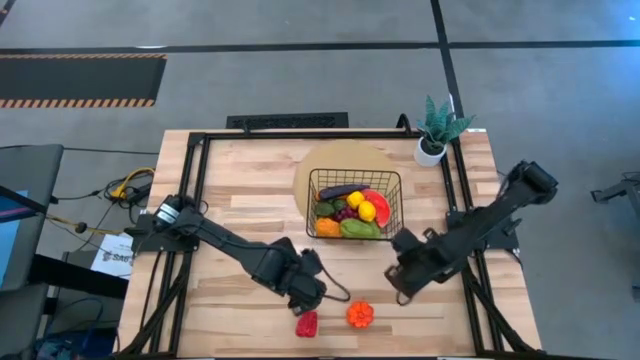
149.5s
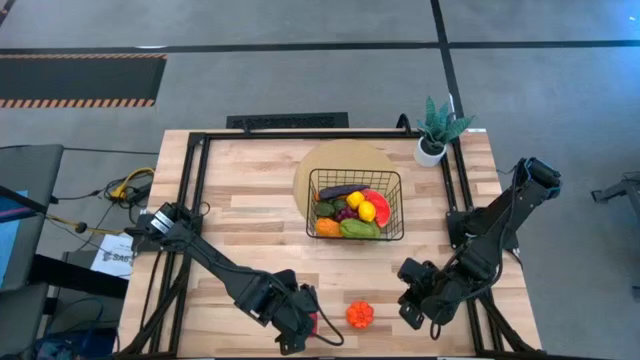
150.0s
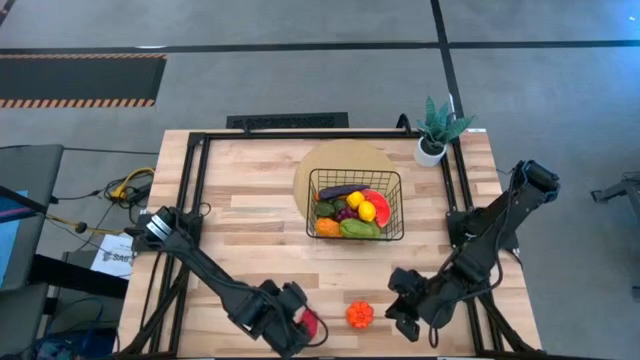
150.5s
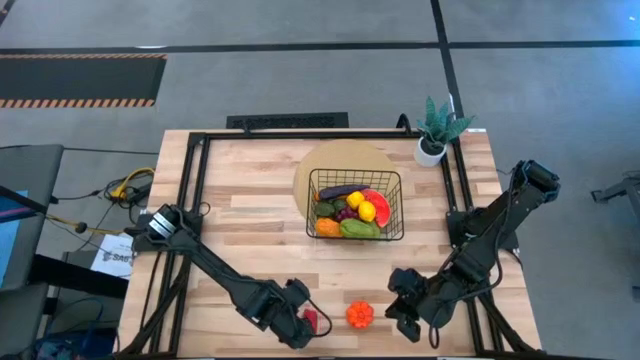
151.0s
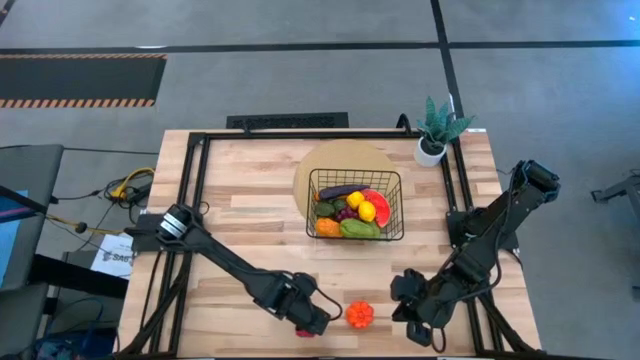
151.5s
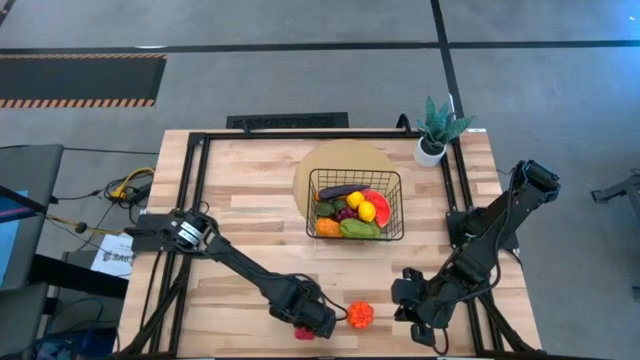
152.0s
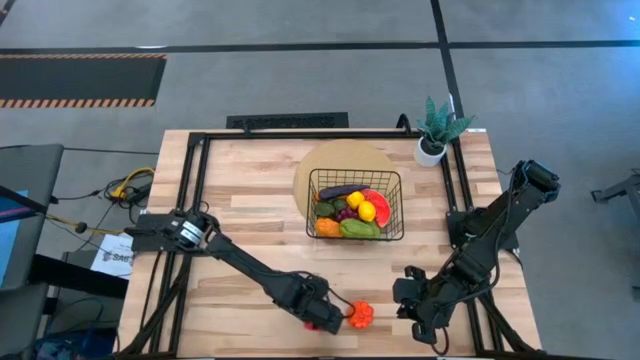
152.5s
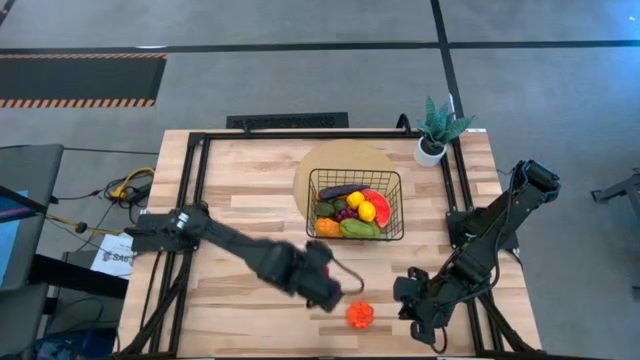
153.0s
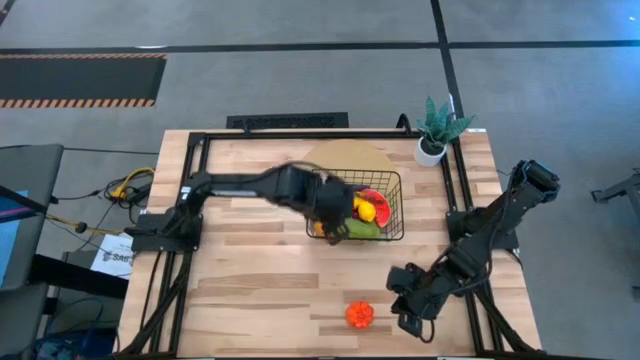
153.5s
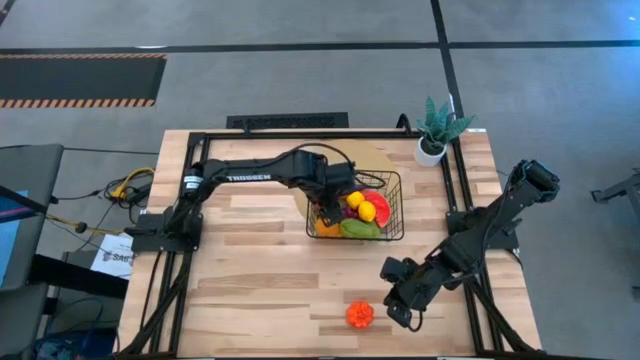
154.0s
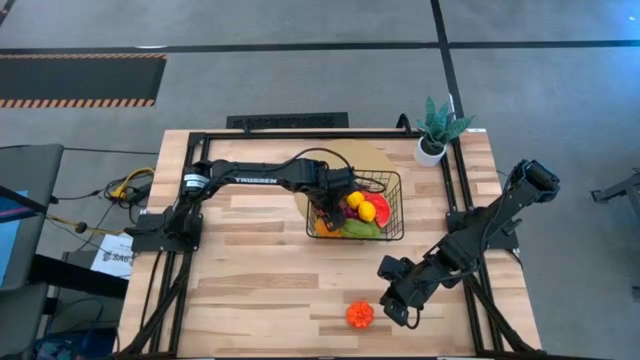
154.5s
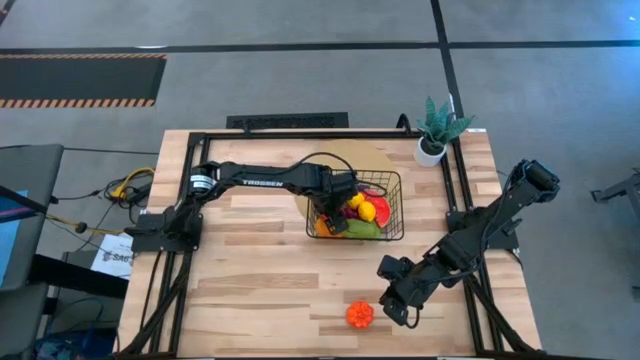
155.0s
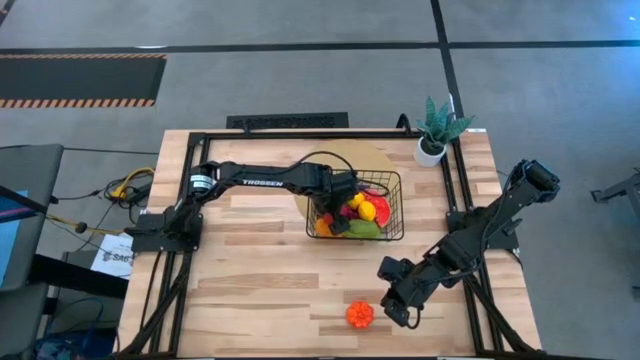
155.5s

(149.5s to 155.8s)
Task: Build produce basket
Put the red bell pepper into the wire basket

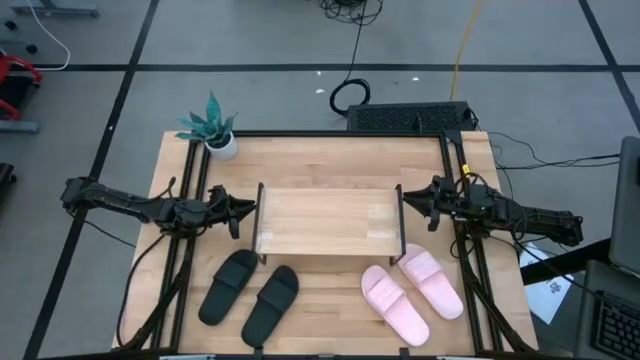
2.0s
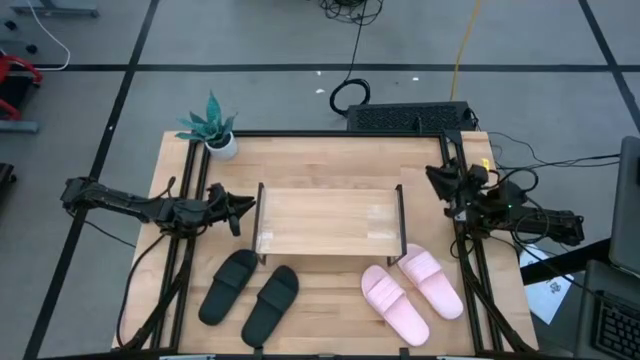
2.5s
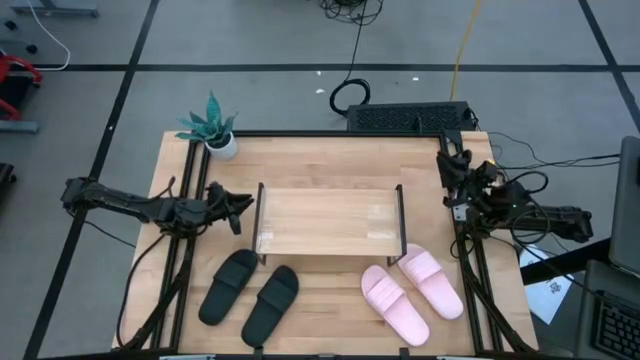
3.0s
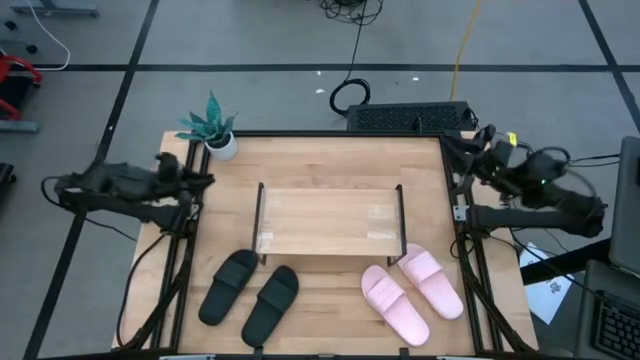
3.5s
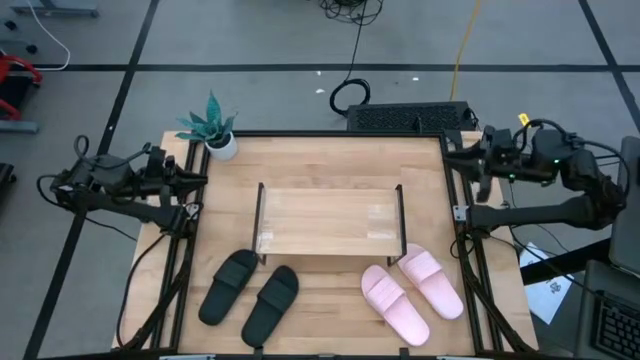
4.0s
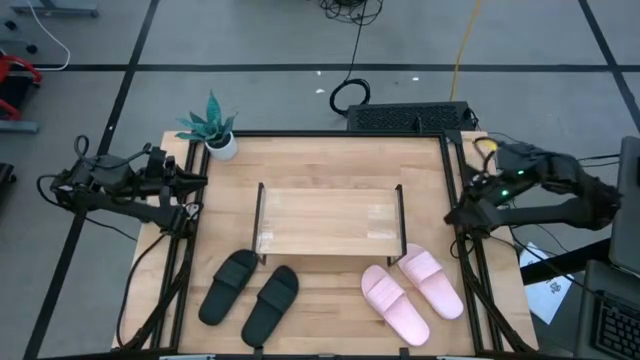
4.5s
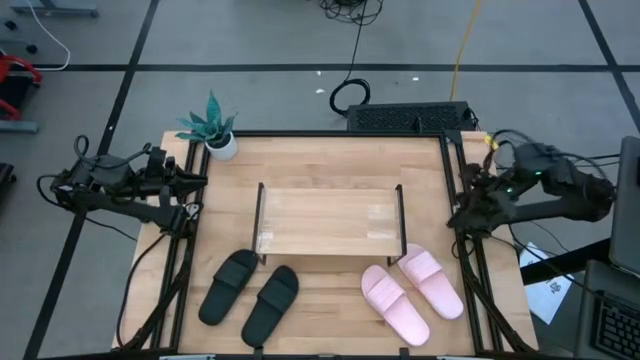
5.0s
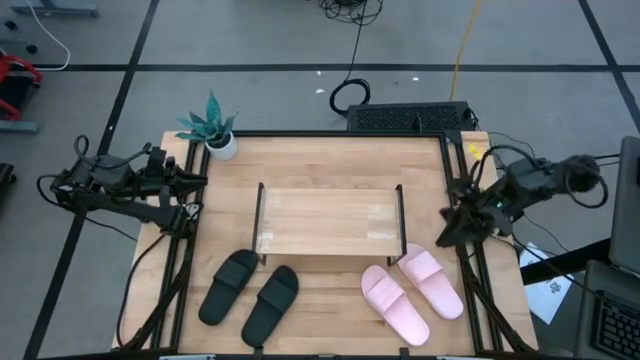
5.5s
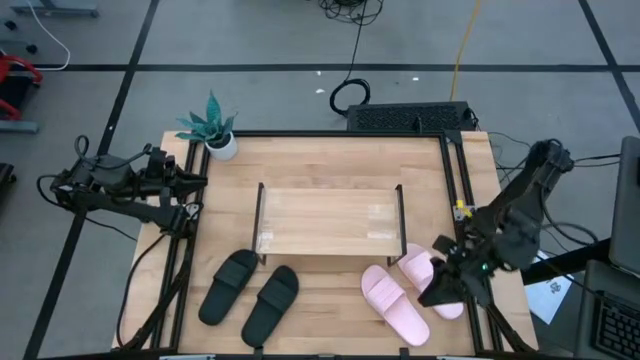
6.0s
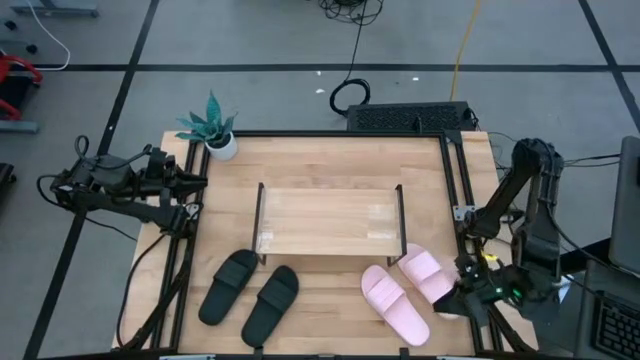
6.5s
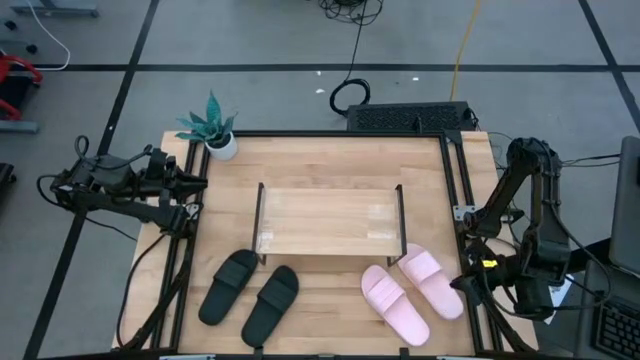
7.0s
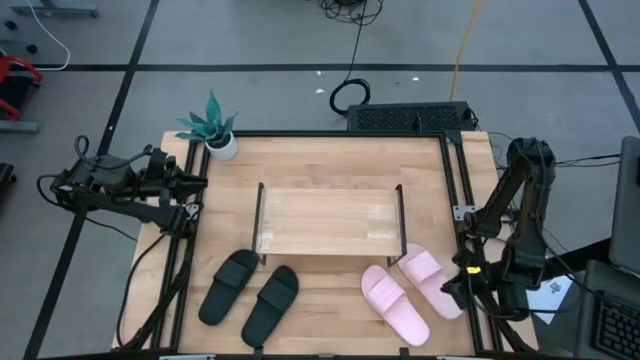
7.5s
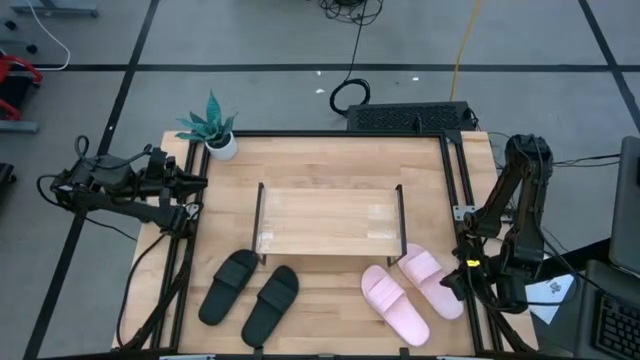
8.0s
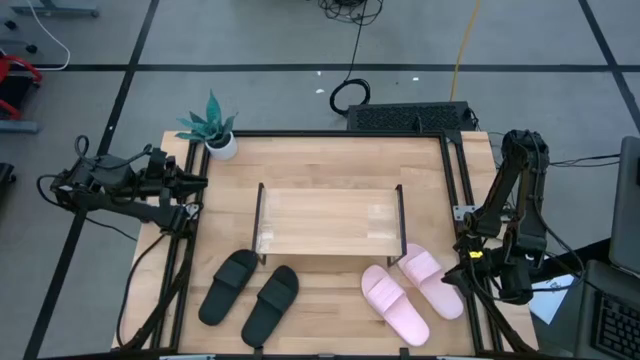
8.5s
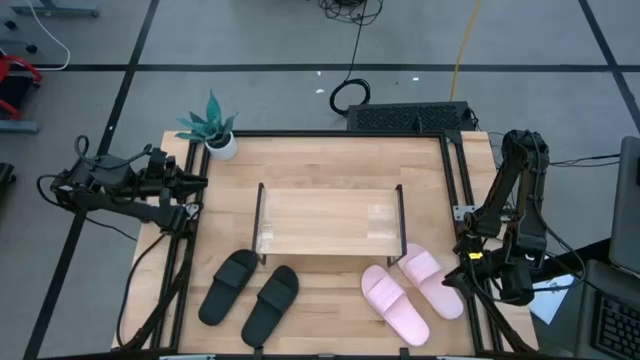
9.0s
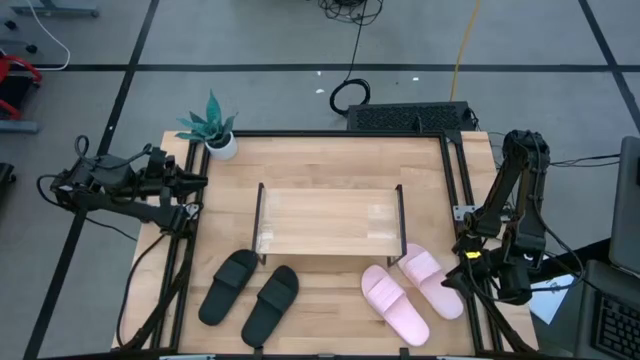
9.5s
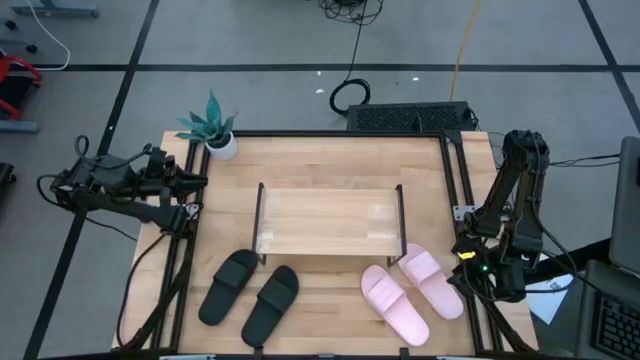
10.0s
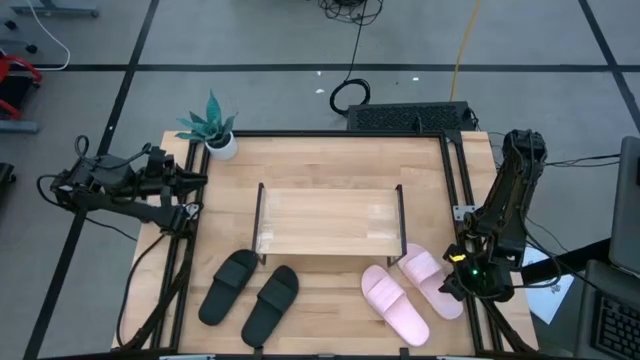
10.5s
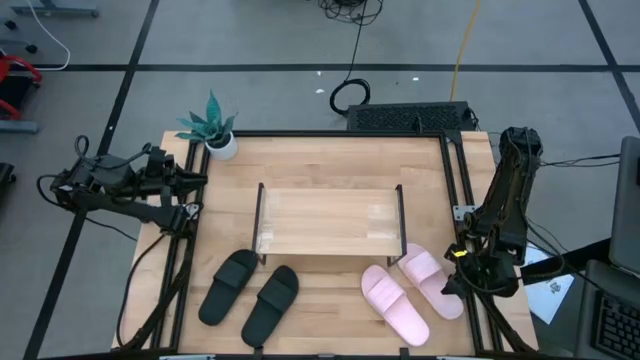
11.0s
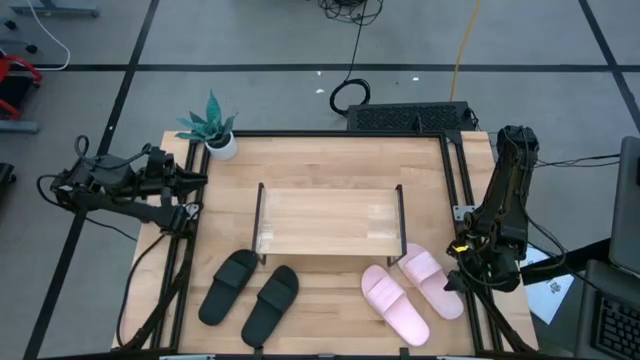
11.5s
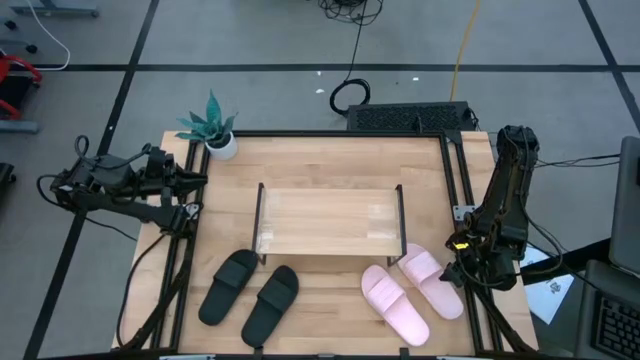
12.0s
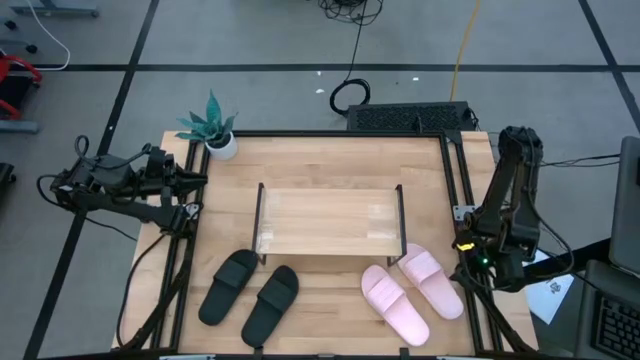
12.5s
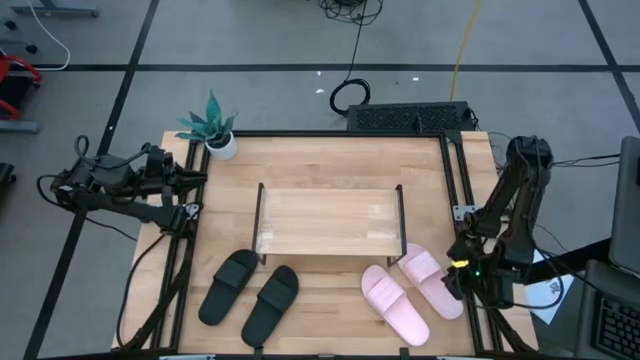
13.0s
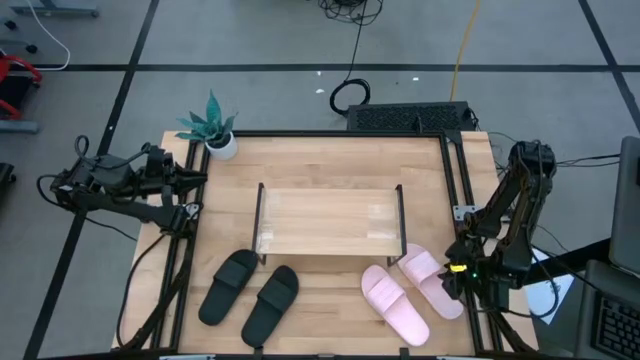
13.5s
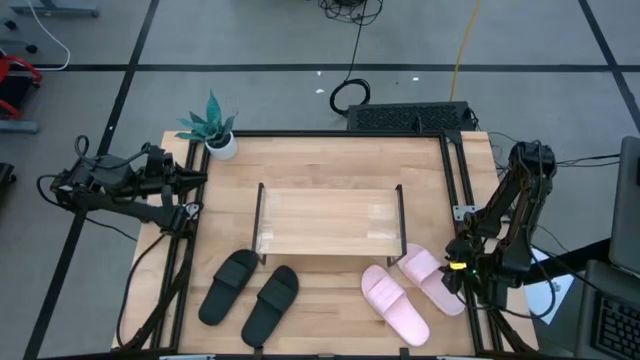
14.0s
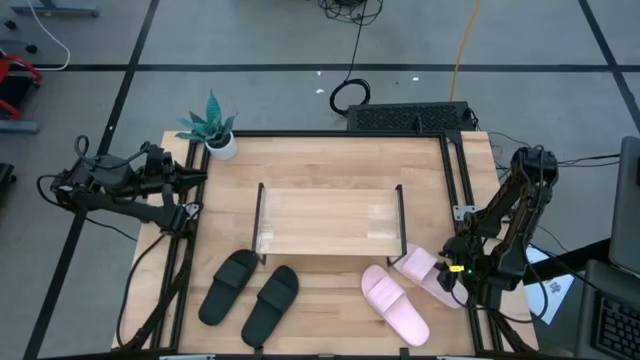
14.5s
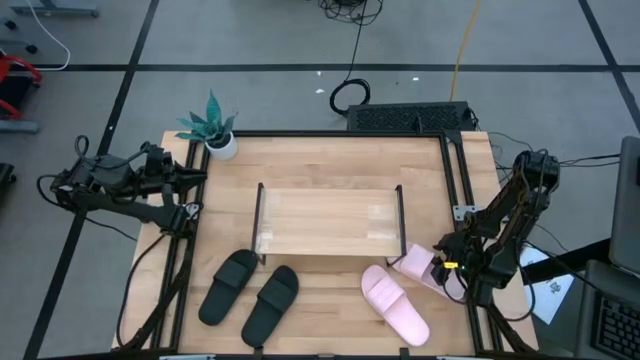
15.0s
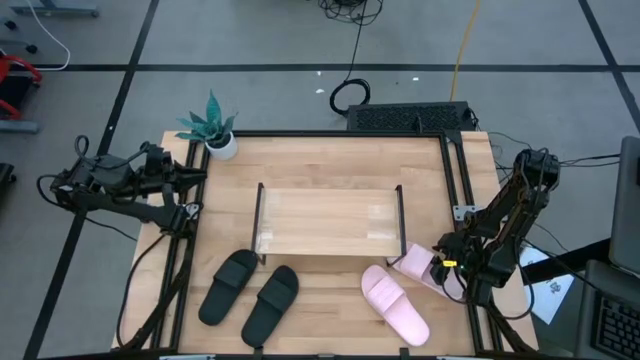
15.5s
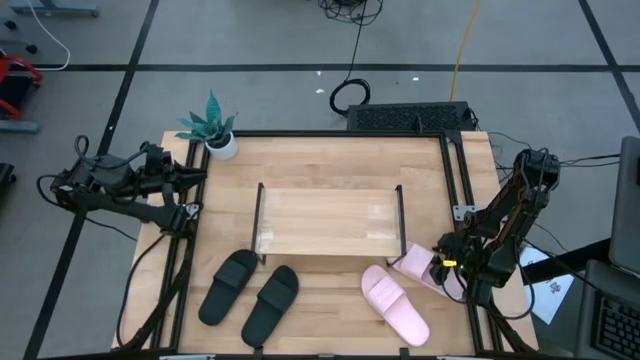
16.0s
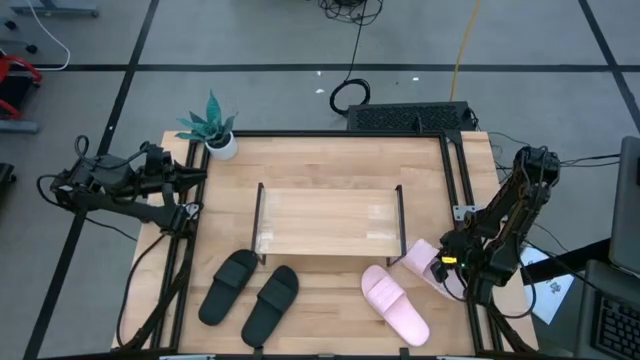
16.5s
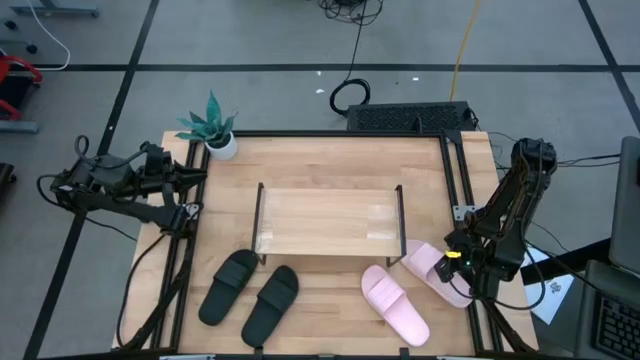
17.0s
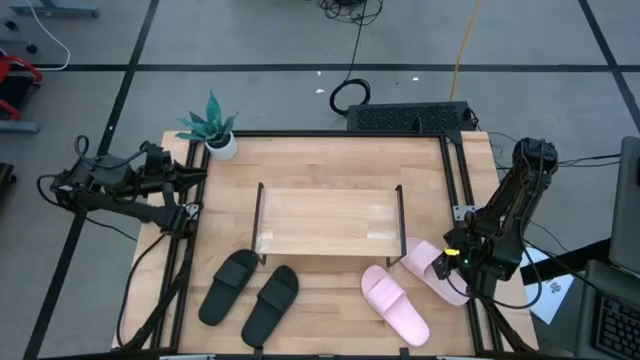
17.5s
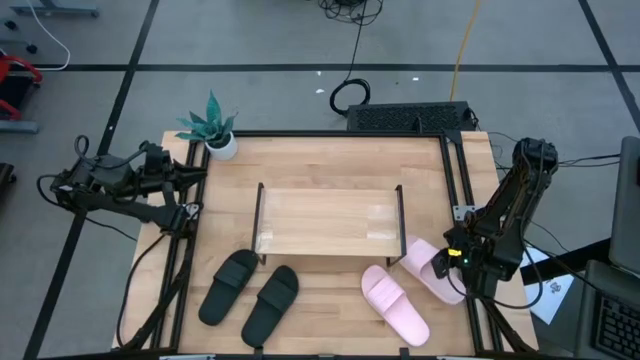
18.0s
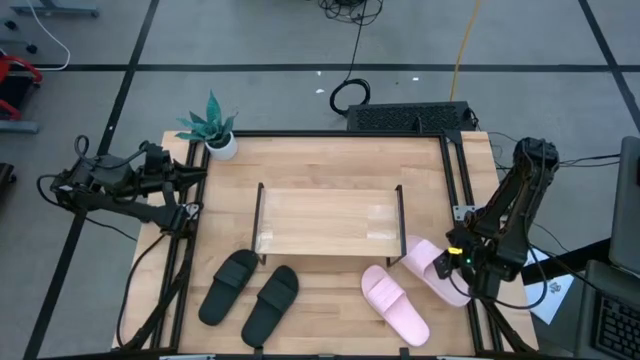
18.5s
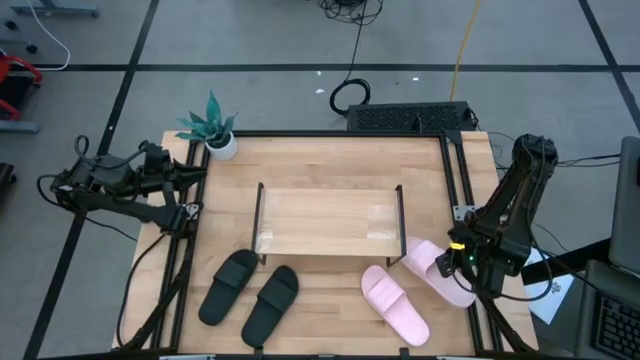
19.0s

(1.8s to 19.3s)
Task: Pick and place slides into the shelf
Put the right pink slipper on the shelf
